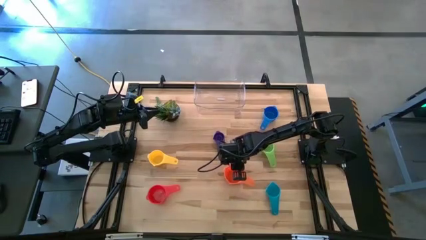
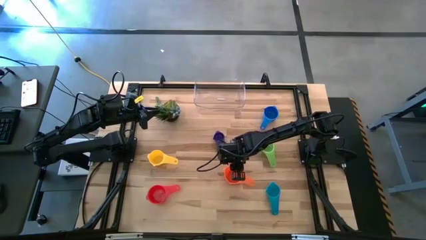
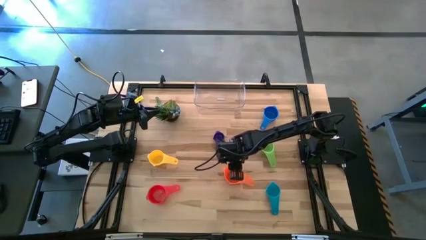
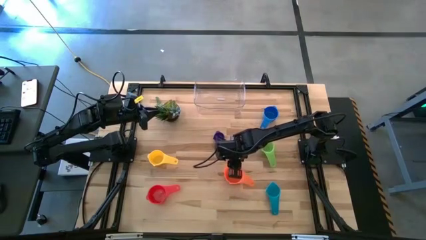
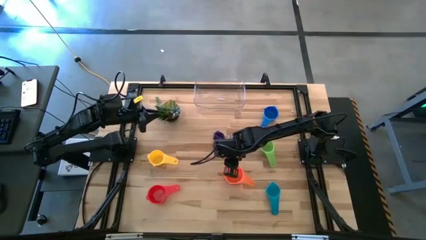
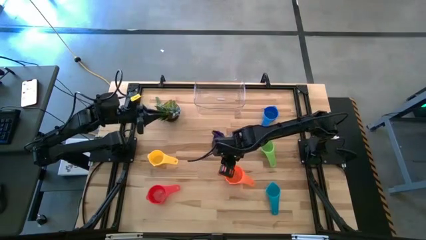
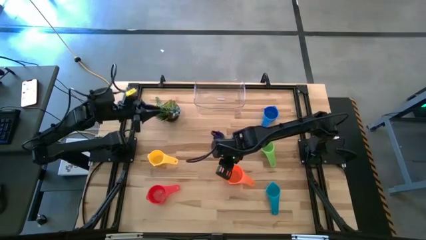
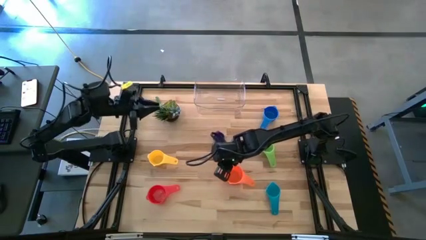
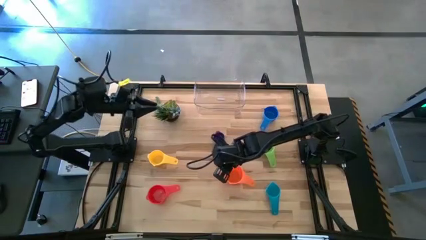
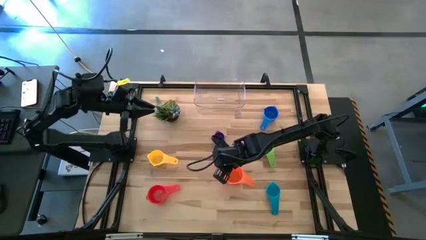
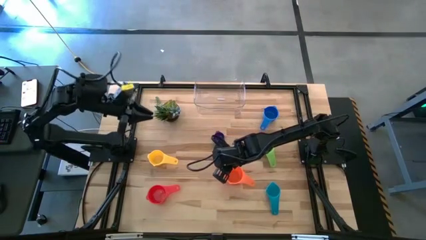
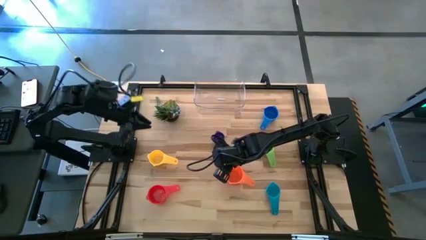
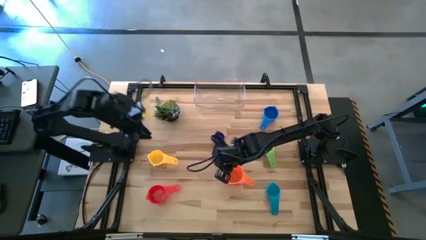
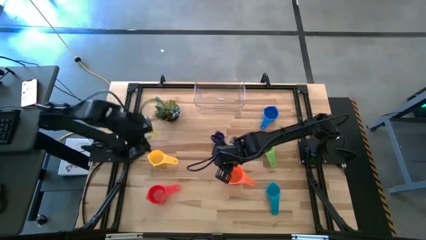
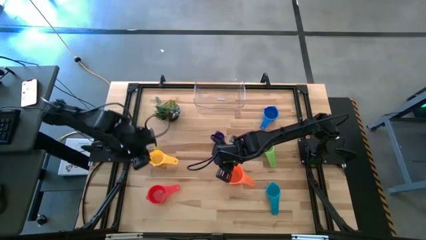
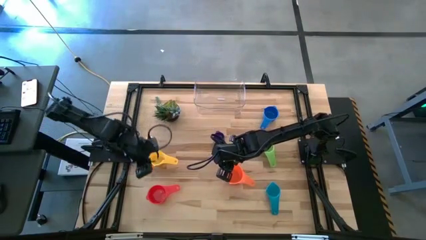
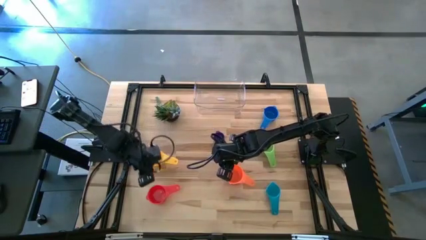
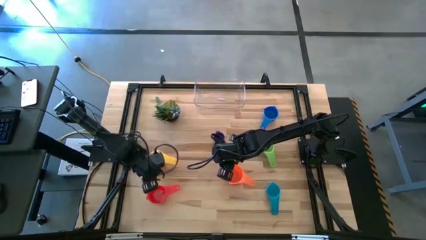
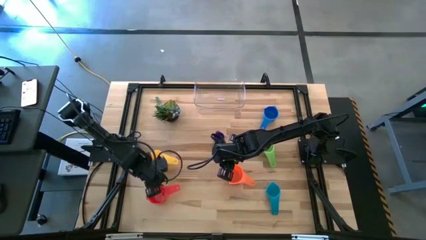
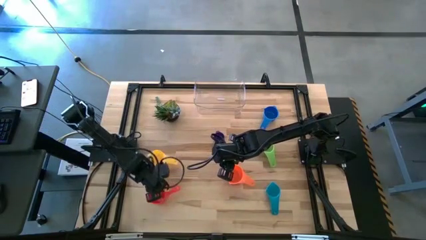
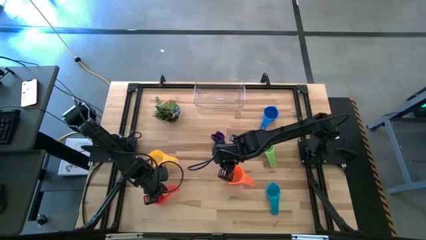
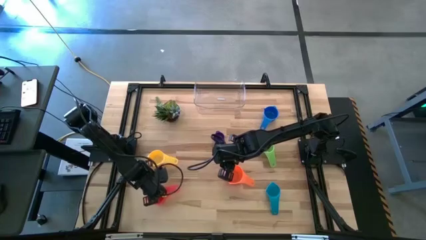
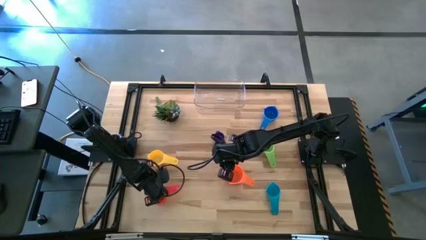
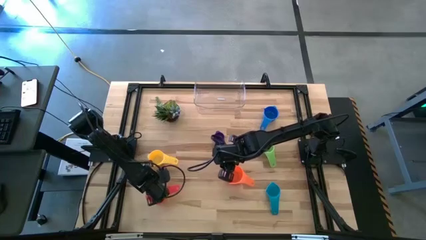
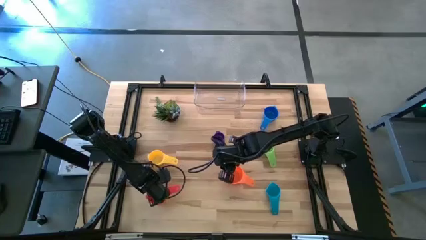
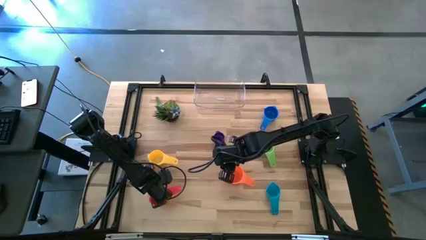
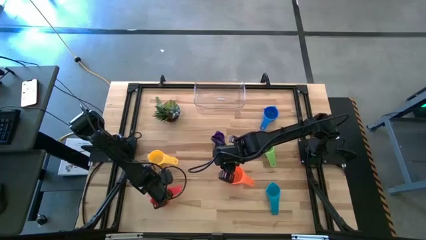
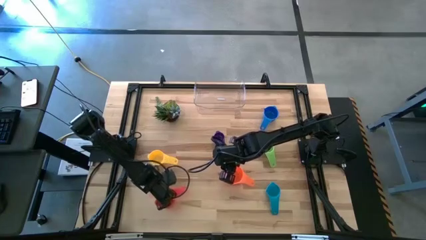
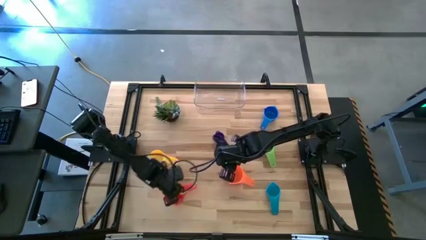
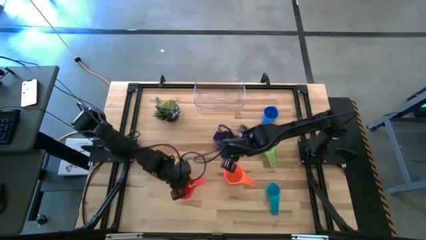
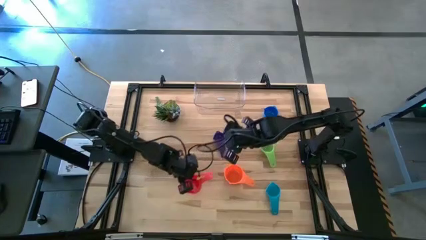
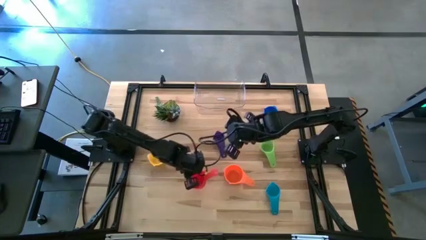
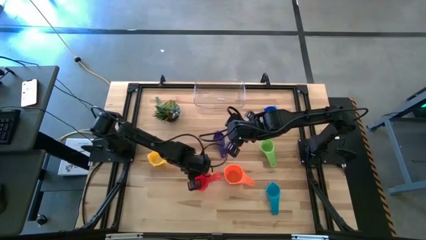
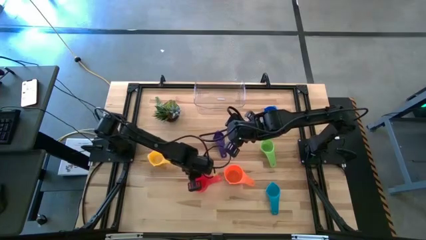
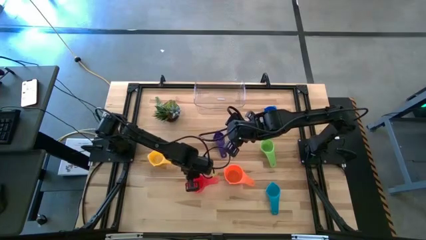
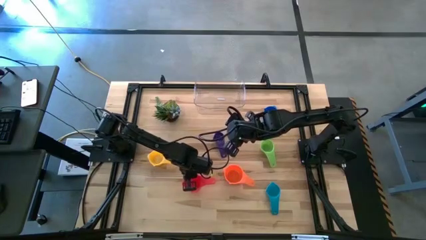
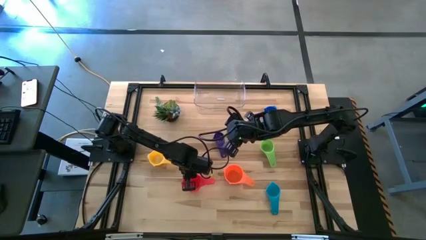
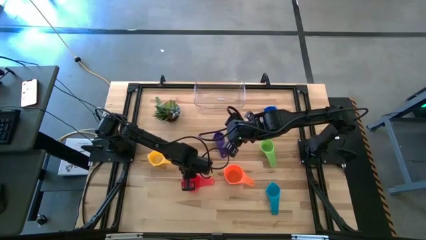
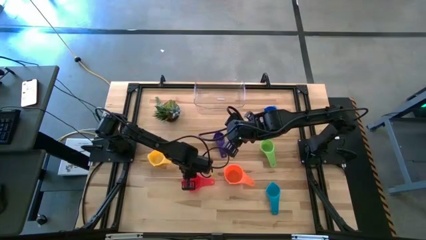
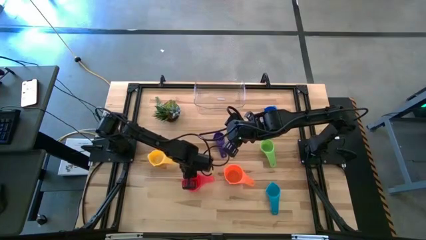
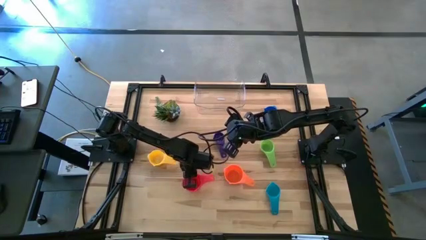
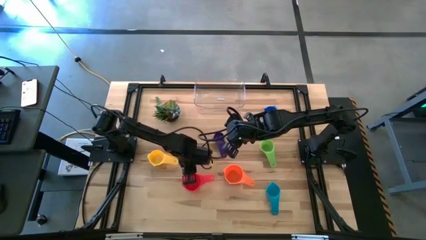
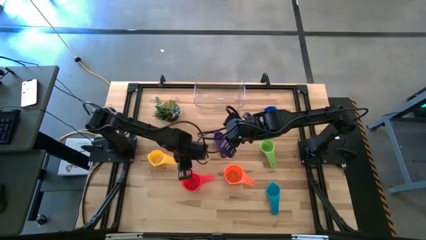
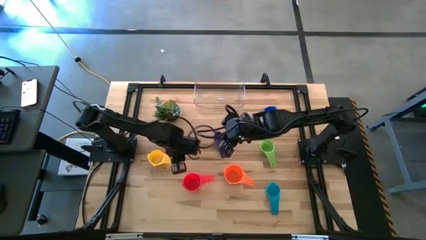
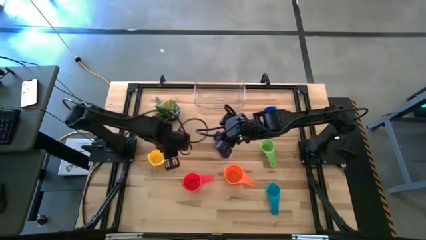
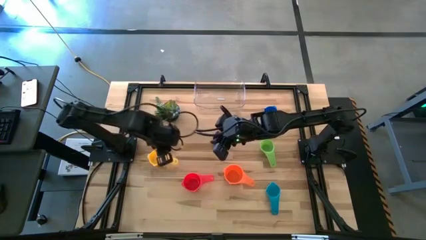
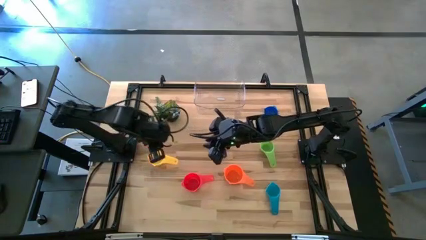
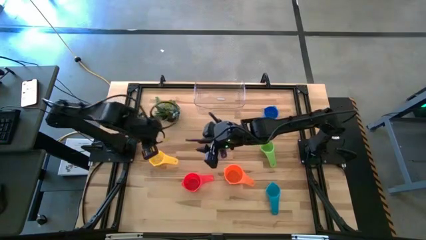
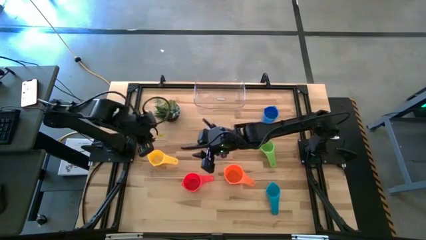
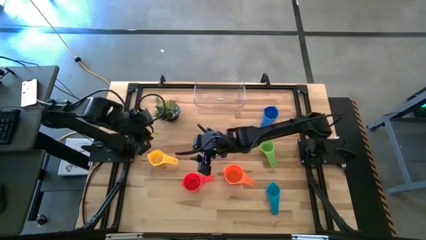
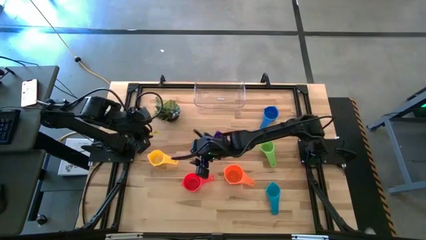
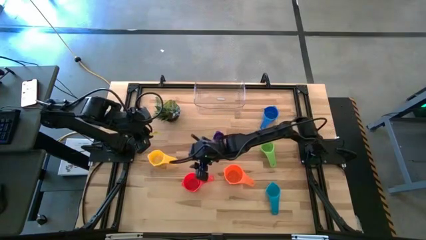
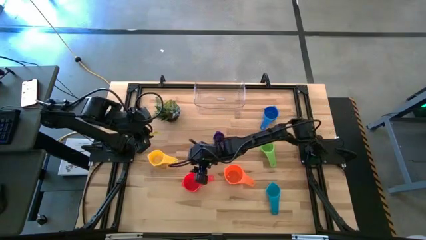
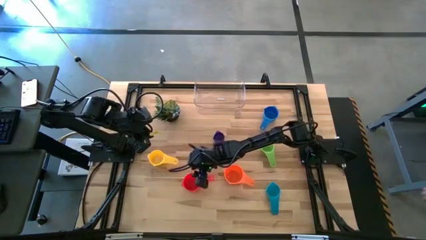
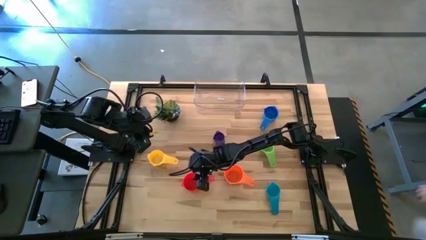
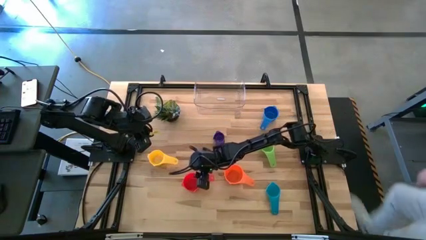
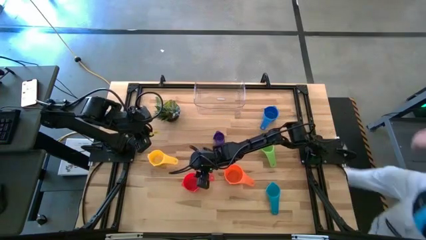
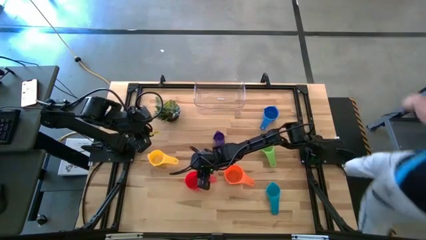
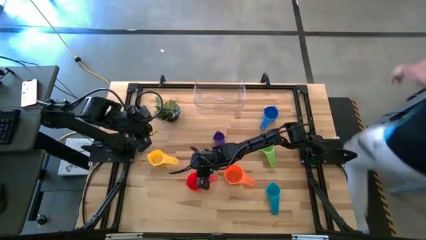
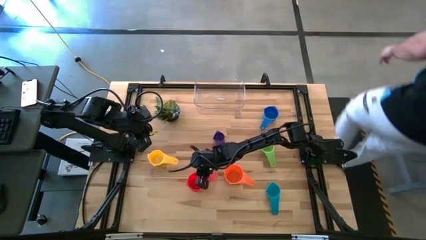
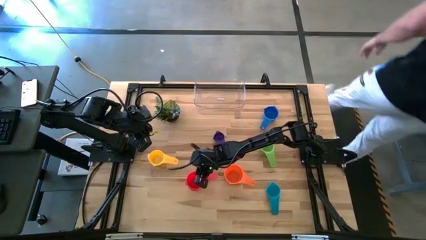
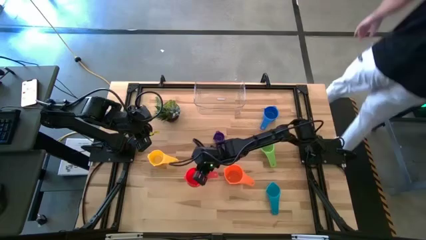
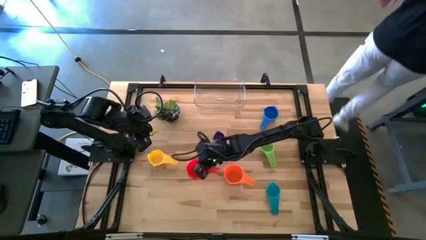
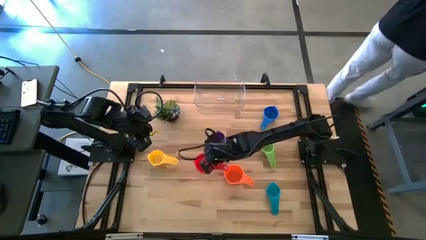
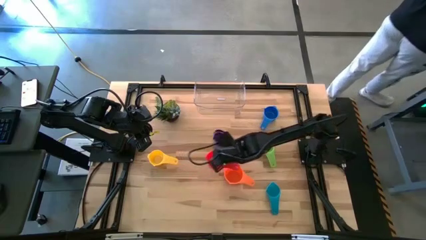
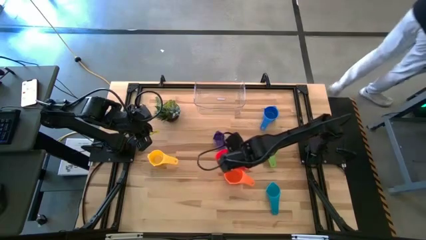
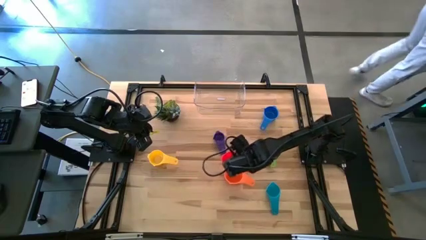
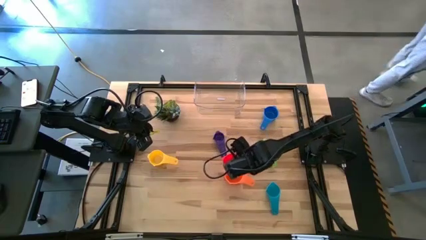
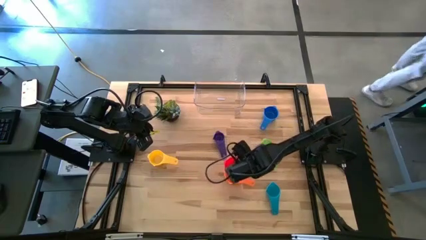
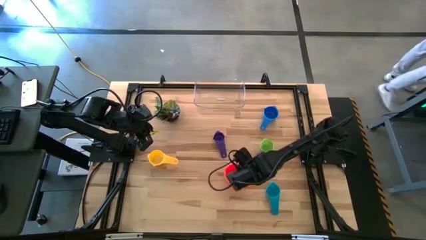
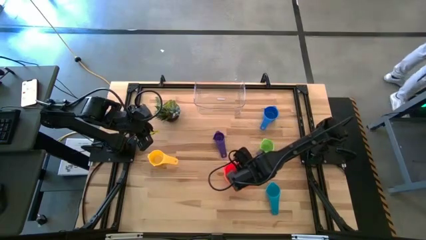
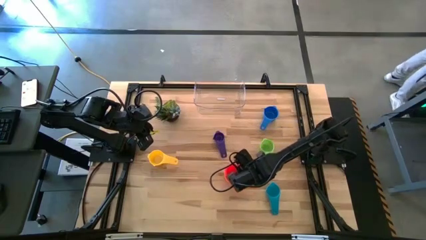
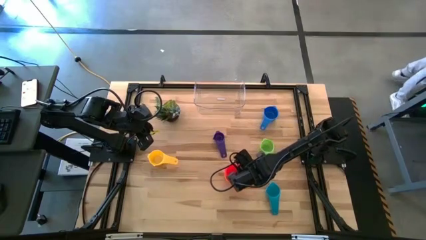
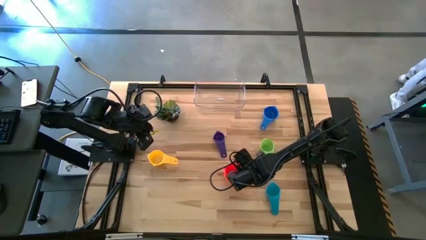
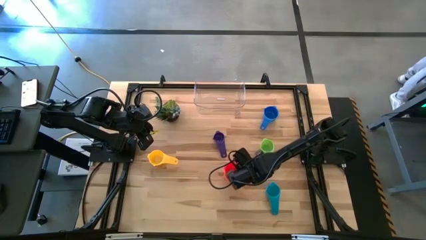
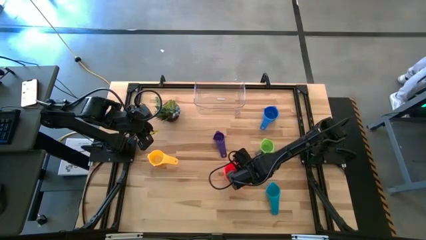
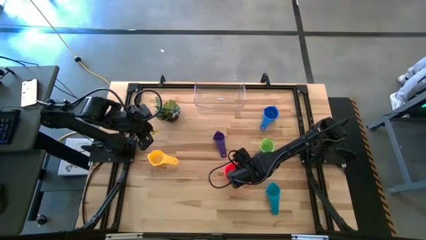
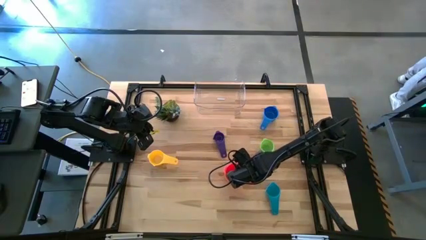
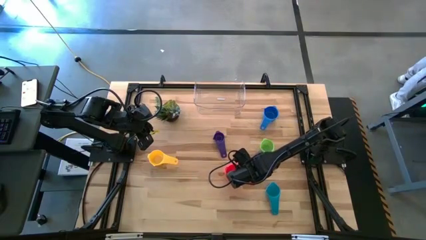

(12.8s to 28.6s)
Task: Nest measuring cups in basket
Stack the red measuring cup on top of the orange measuring cup
